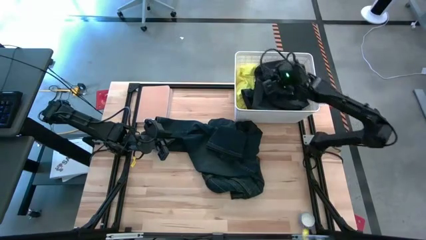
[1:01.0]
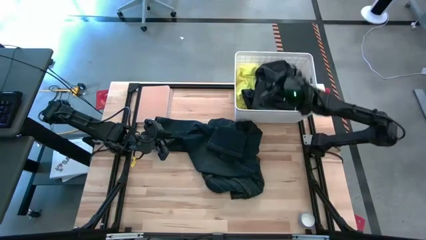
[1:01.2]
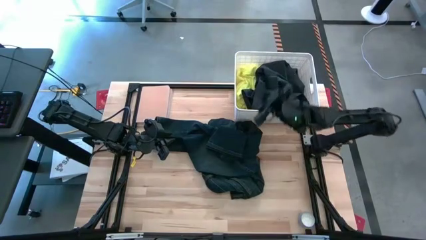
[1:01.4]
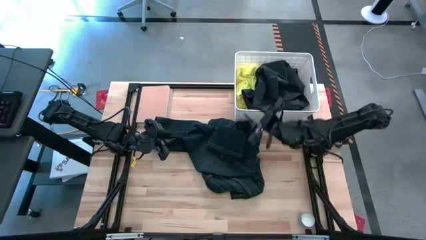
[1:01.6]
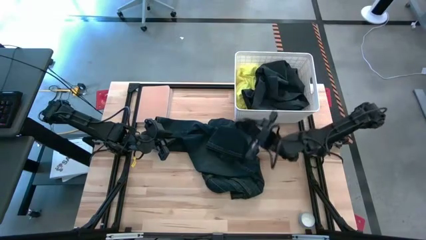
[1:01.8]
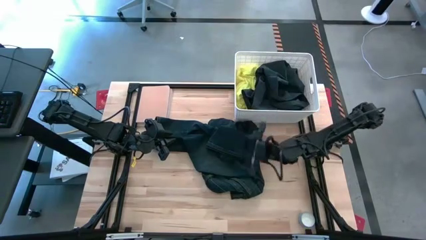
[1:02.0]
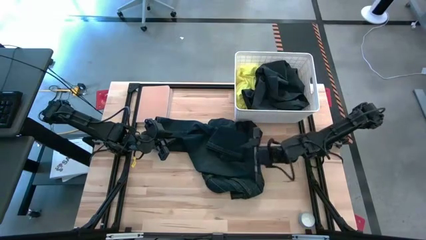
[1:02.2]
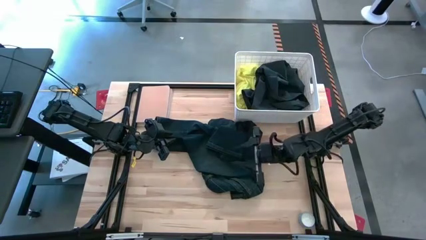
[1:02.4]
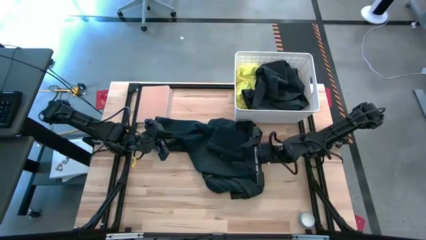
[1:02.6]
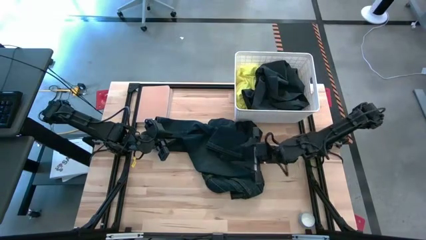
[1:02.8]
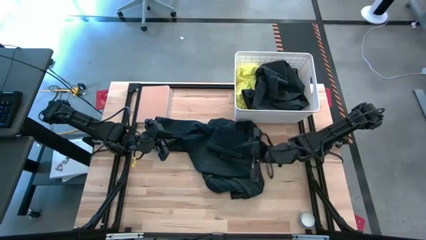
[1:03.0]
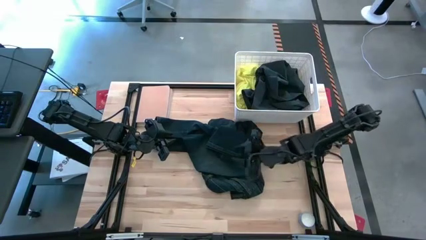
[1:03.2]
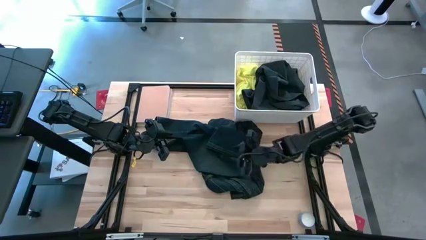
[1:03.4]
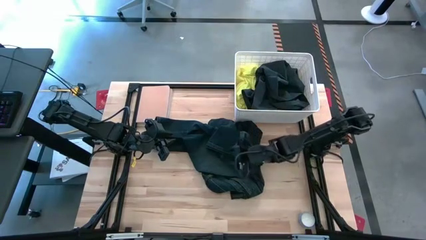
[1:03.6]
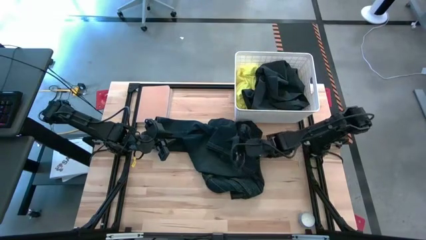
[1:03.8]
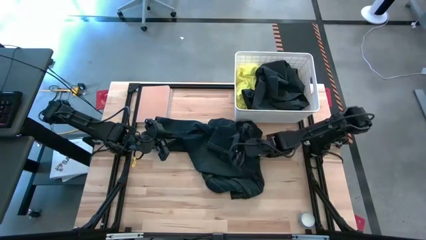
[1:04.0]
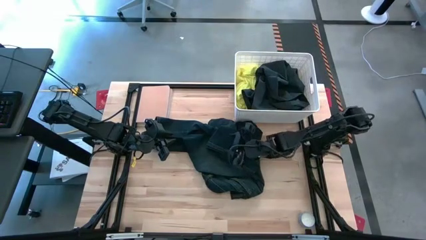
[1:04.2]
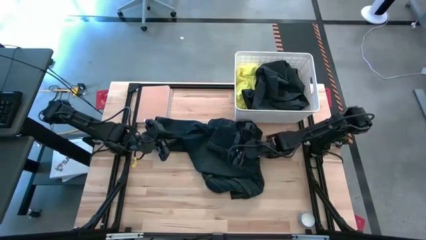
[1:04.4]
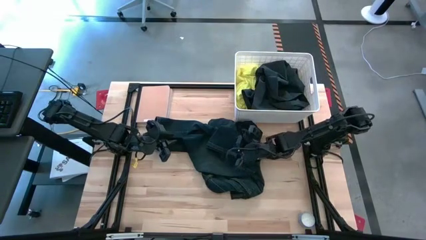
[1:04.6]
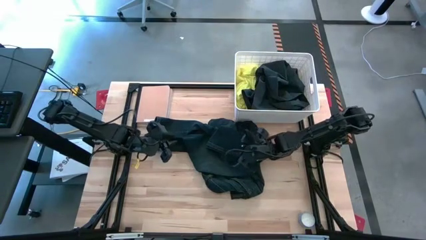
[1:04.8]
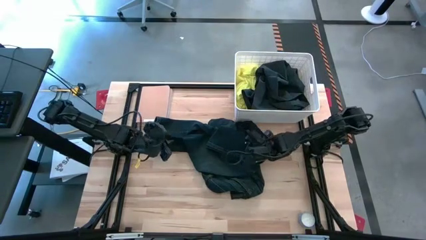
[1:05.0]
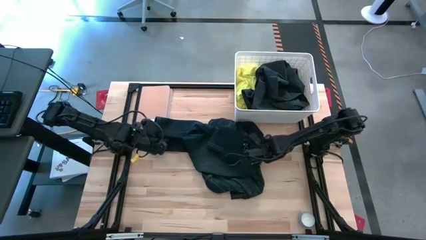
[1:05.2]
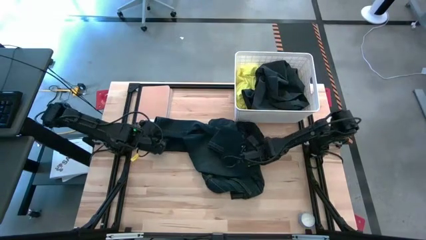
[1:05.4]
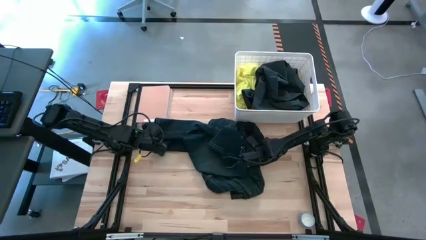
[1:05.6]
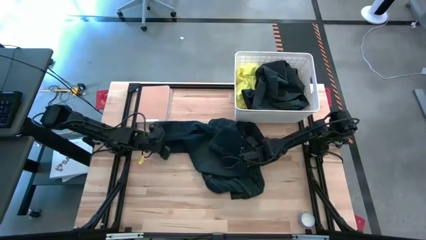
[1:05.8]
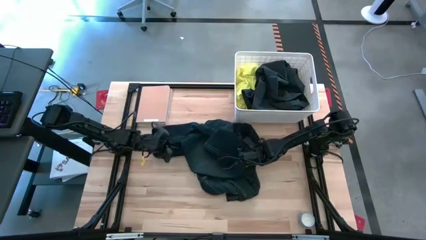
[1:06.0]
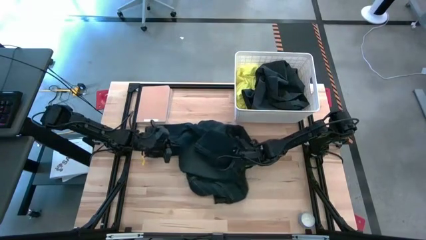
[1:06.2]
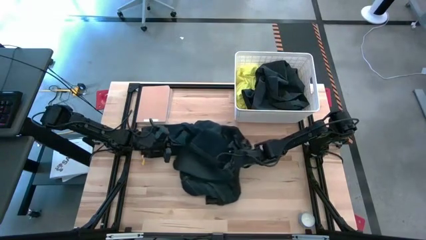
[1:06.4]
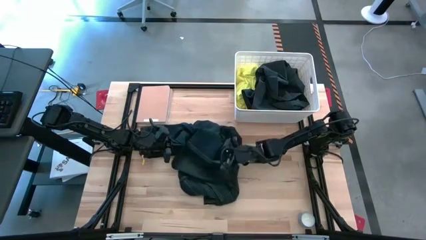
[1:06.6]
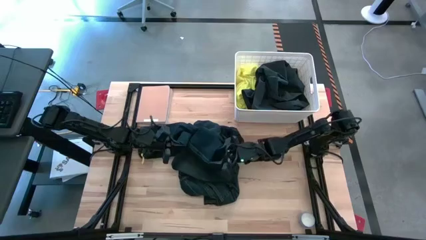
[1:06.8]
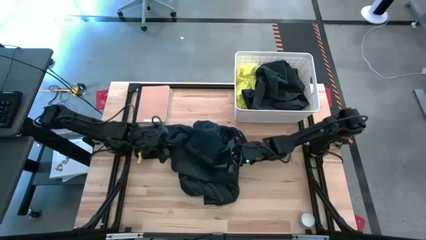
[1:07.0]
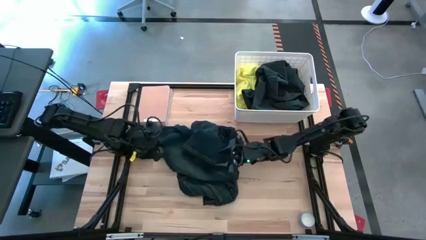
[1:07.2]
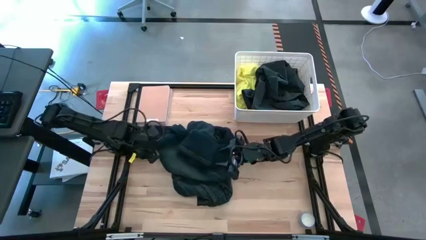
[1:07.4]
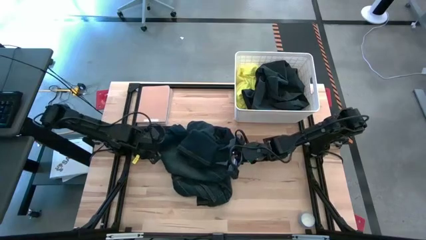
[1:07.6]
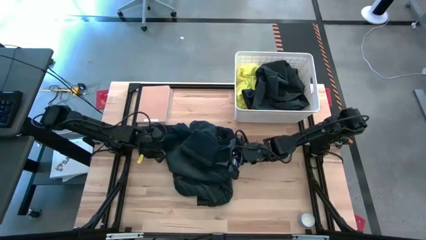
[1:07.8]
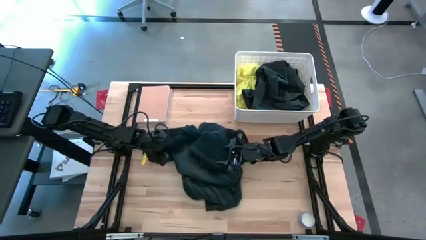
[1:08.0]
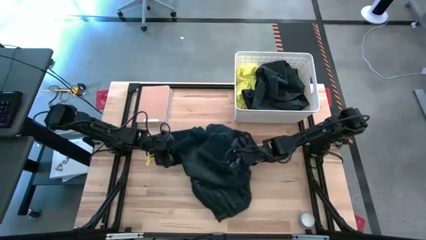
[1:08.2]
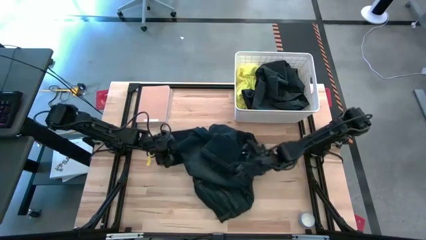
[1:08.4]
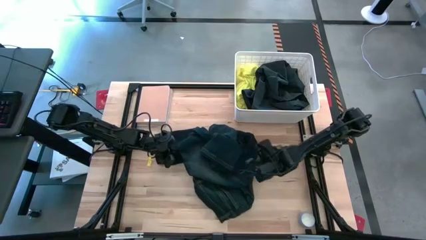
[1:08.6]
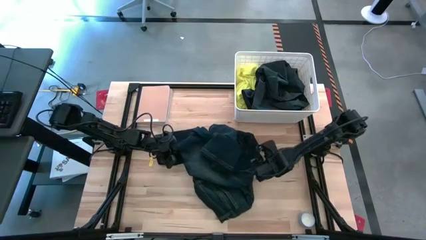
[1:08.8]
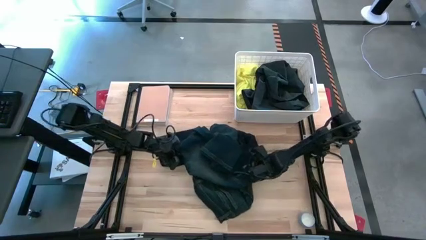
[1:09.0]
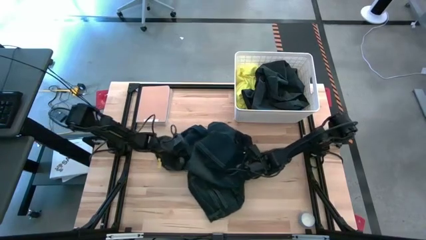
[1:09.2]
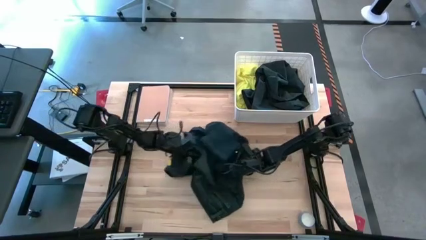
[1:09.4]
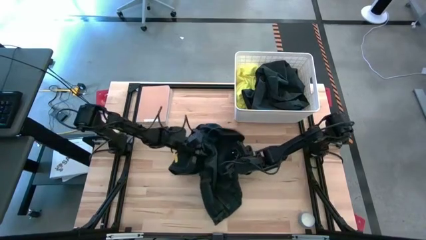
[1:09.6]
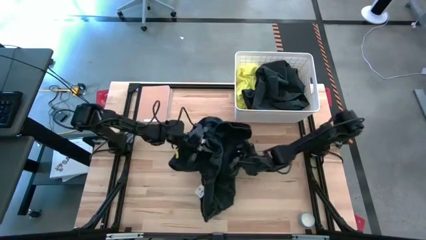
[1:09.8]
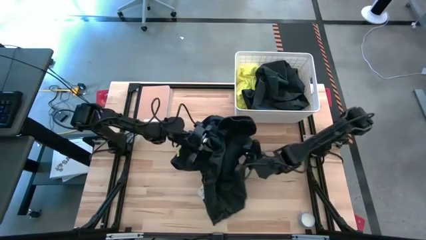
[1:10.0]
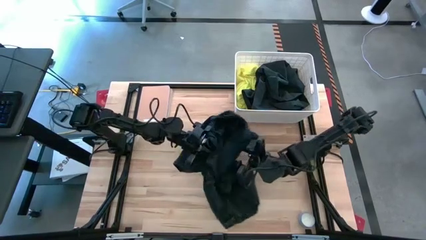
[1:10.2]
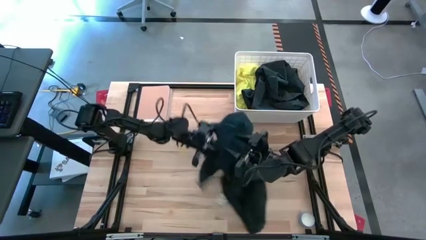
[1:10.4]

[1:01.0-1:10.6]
Task: Sort clothes
Put the dark blue jeans into the white laundry bin
